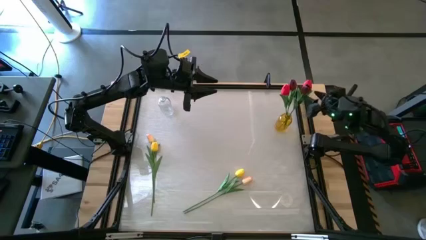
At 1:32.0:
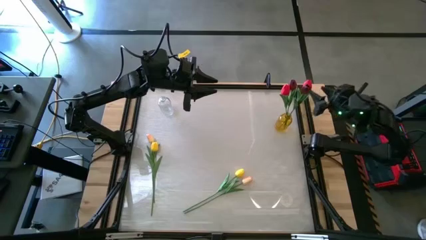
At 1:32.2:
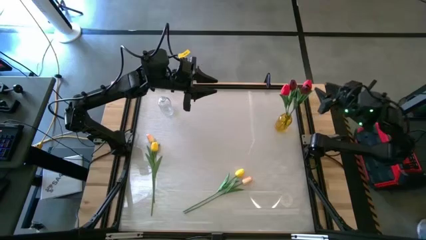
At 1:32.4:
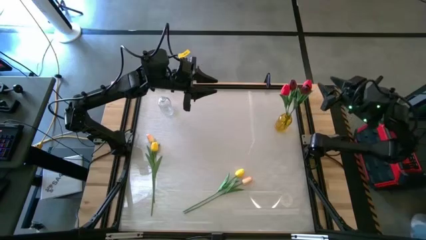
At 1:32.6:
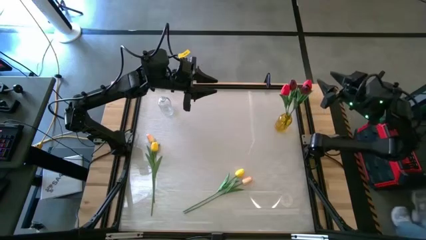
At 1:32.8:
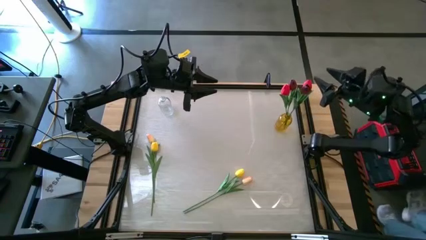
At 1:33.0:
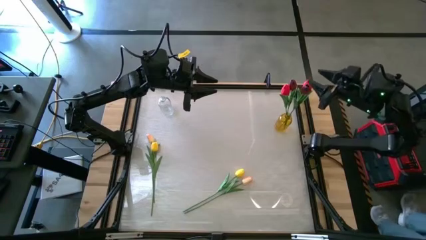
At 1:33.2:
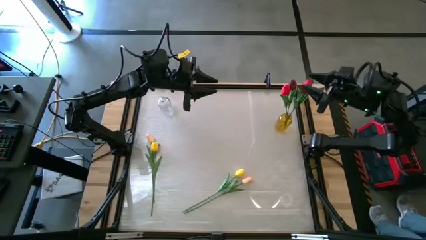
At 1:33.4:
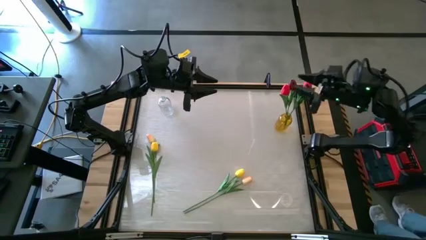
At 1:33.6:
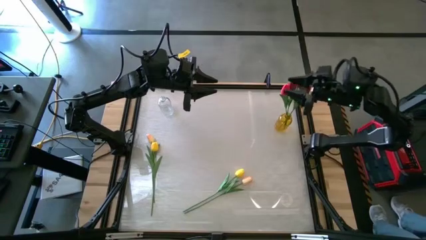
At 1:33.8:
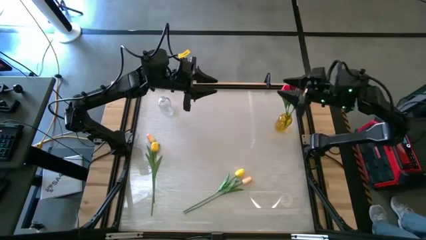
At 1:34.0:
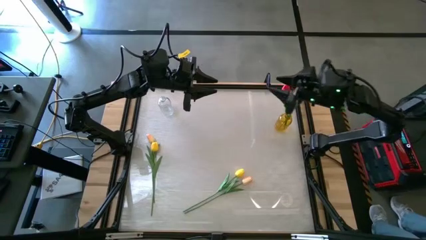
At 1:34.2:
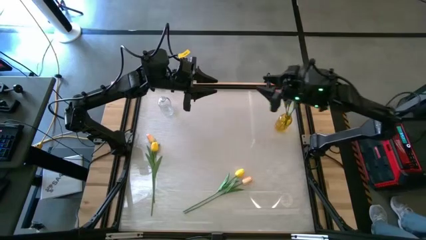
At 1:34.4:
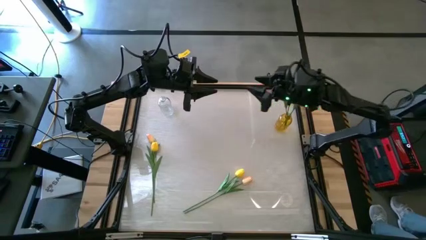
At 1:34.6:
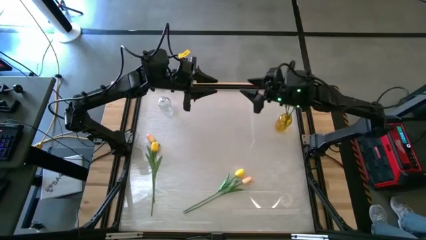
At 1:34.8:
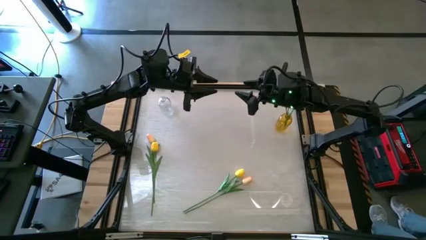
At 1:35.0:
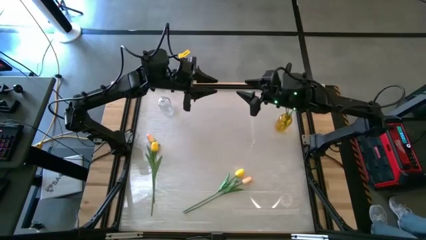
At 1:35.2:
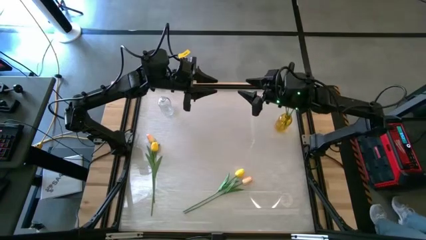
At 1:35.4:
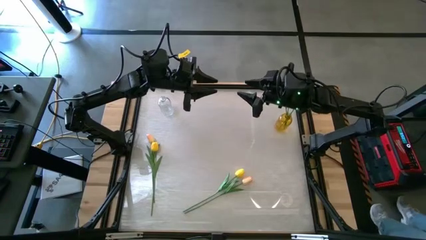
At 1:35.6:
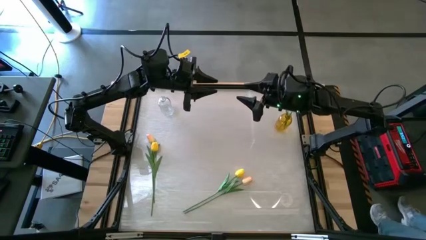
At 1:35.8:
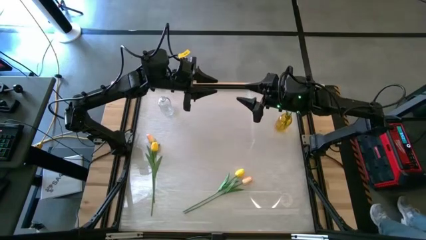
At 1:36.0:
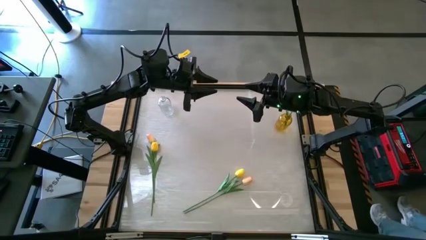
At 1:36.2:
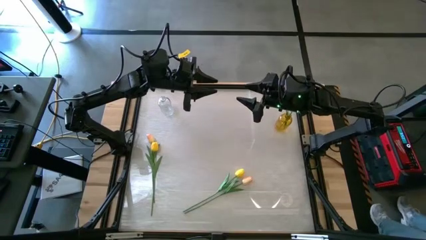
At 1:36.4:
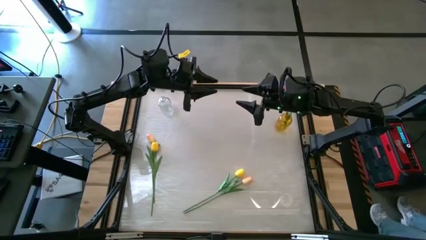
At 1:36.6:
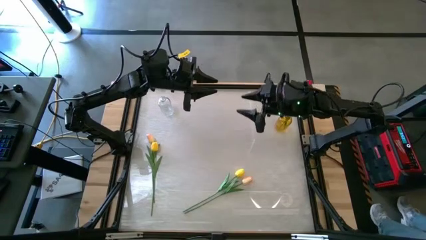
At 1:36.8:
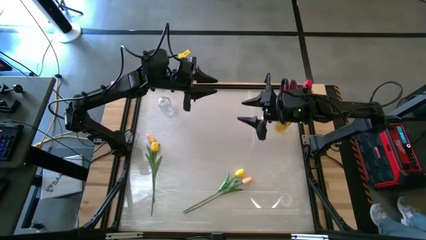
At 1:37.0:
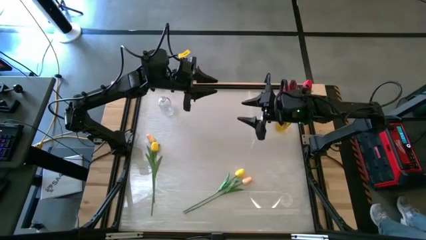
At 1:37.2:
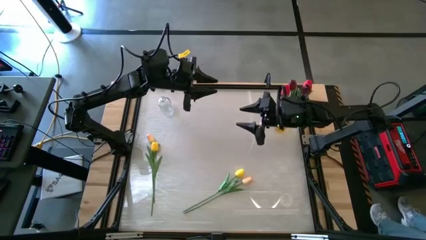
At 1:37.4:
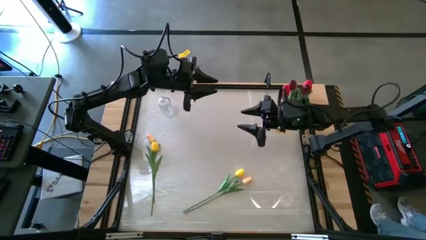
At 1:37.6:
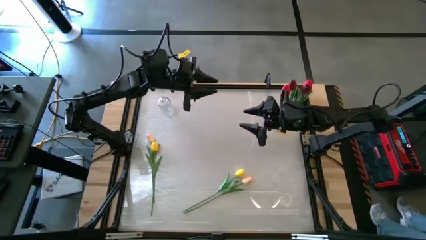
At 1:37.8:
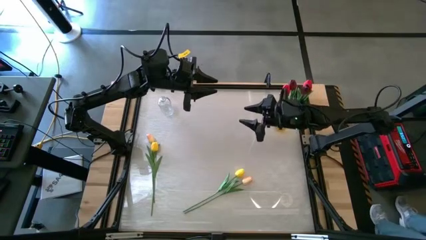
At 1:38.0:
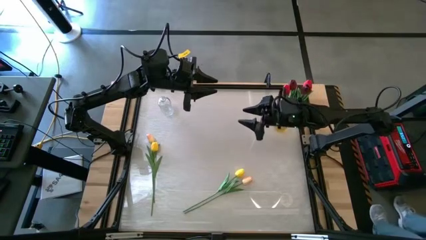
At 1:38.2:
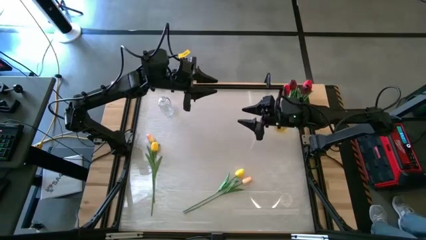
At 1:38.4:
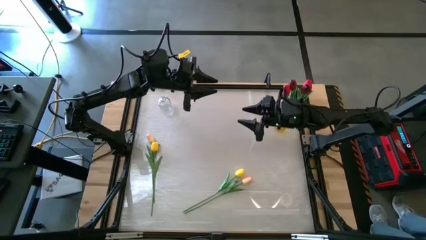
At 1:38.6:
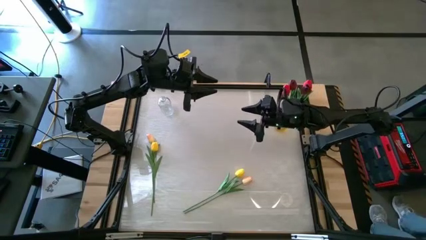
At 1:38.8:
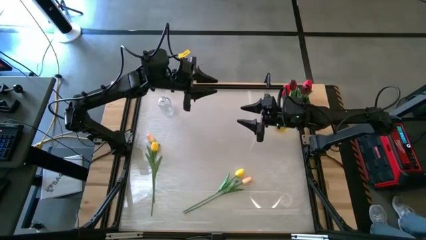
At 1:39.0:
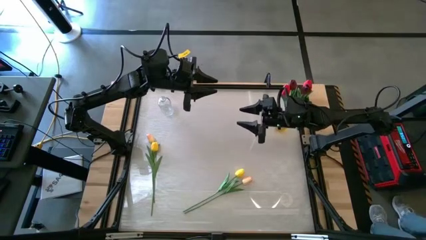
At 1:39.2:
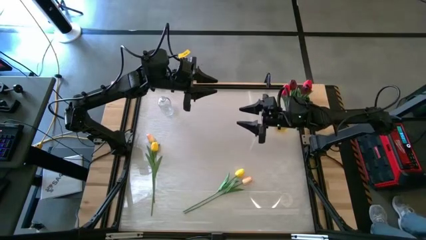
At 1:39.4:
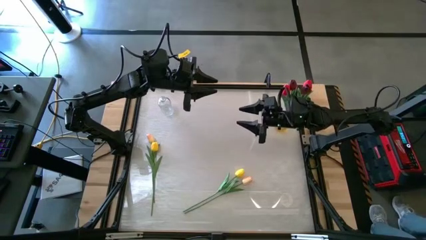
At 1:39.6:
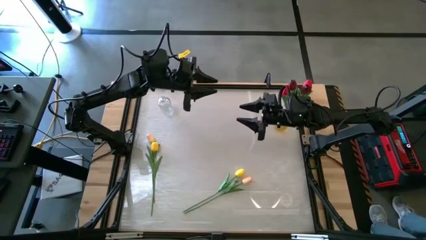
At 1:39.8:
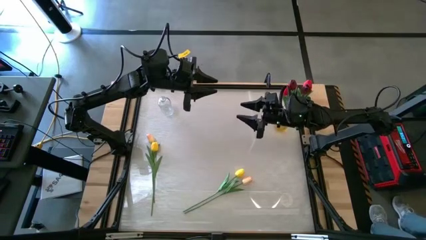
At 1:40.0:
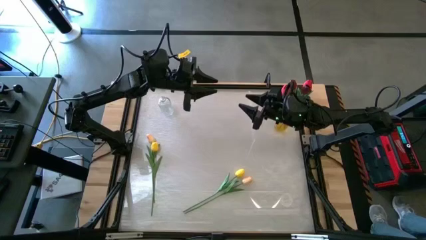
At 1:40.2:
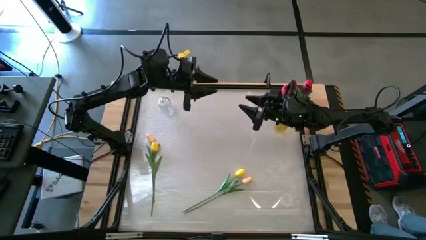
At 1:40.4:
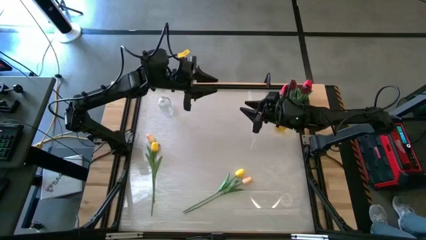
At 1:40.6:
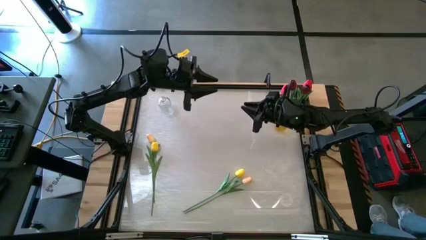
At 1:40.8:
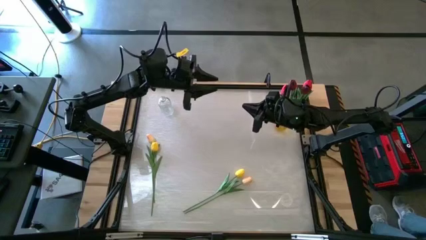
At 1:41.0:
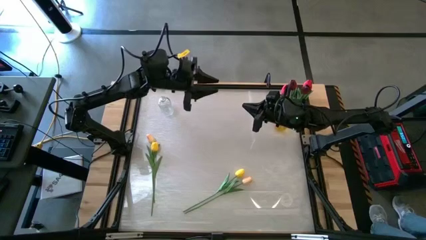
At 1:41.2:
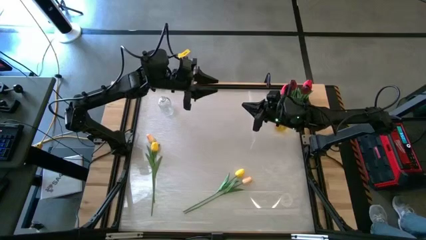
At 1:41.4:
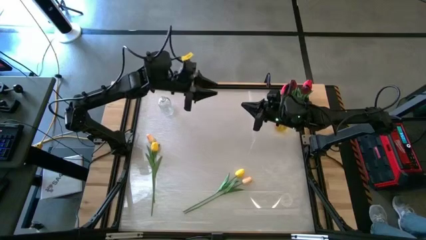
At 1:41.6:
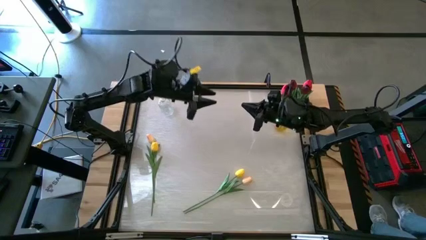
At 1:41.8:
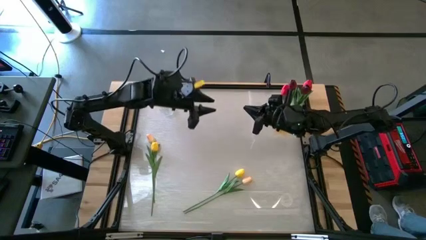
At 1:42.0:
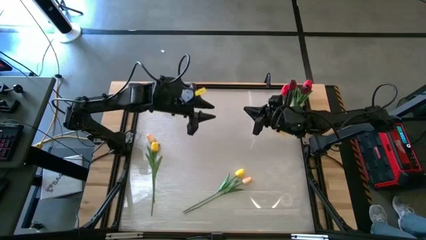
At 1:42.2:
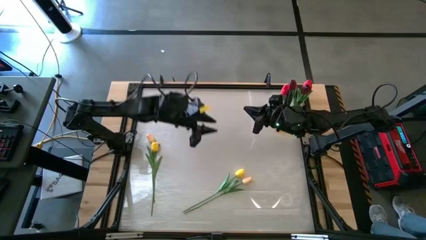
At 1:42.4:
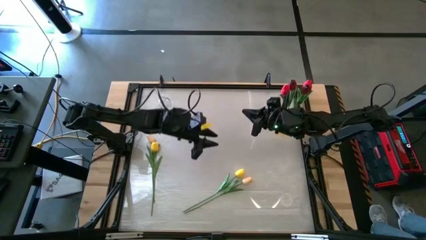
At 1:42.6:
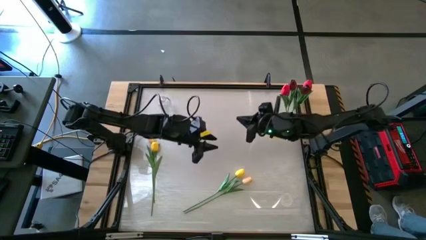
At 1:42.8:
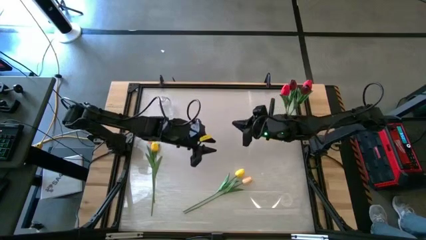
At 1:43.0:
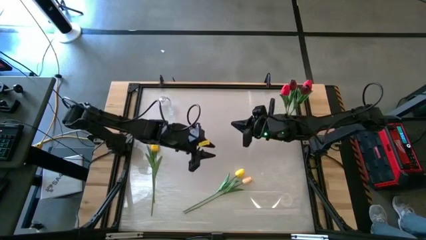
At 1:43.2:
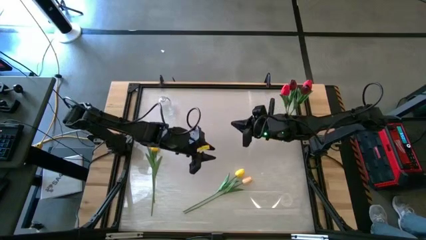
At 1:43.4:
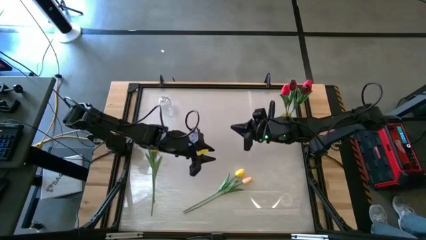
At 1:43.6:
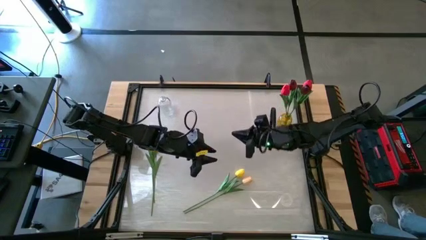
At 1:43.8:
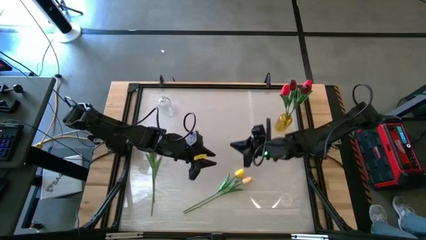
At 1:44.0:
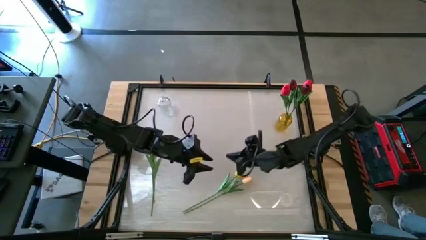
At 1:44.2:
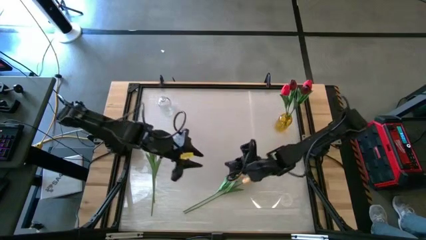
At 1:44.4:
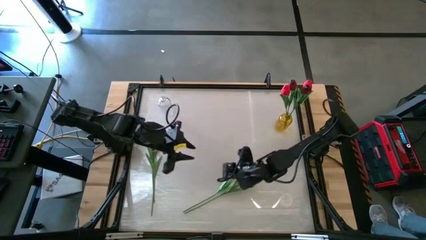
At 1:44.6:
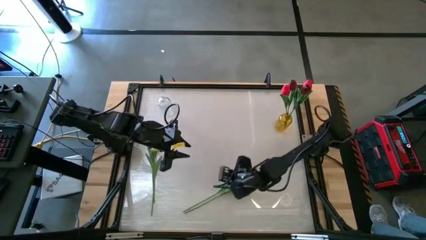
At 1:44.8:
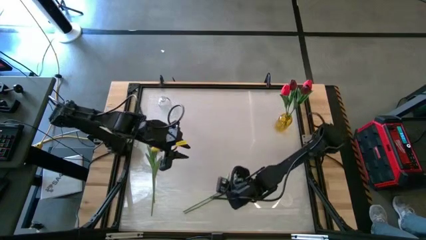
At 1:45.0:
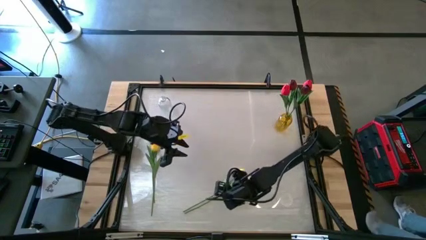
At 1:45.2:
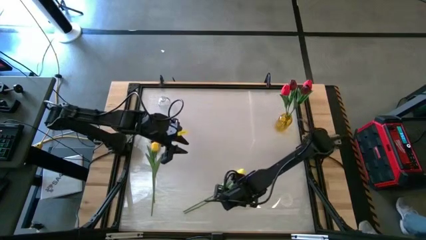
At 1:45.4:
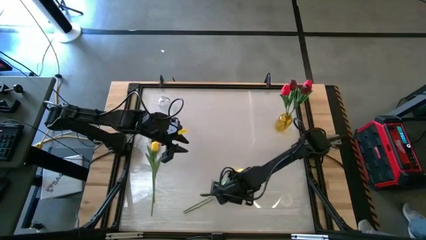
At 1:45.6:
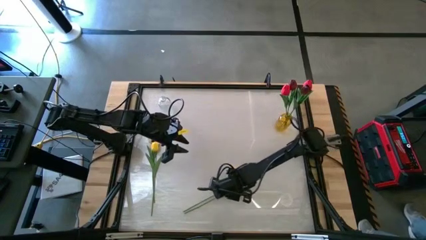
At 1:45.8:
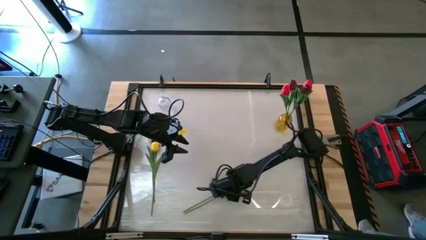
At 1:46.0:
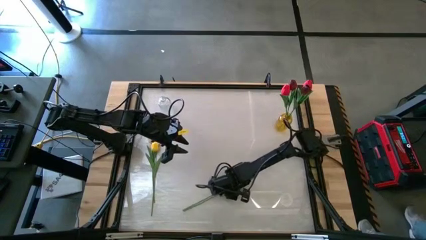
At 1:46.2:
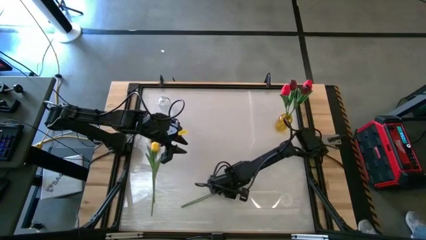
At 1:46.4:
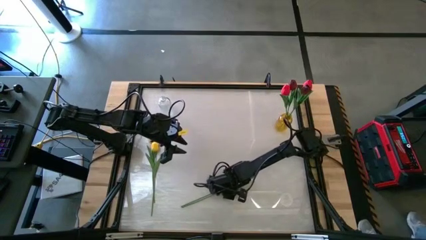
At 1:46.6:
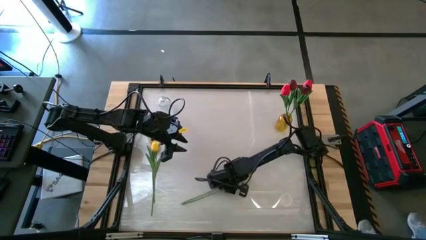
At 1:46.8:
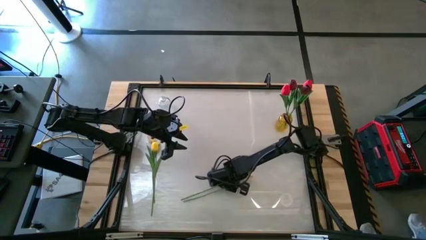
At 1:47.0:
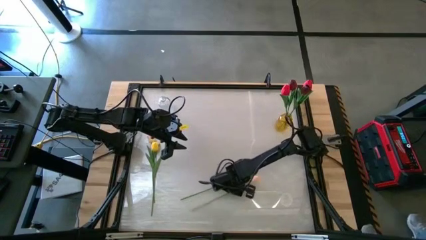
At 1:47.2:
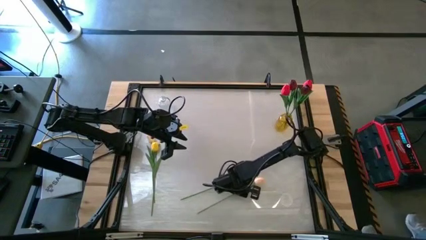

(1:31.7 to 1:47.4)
Task: Sort flowers into vase by color
Put the bottom light pink tulip into the transparent vase

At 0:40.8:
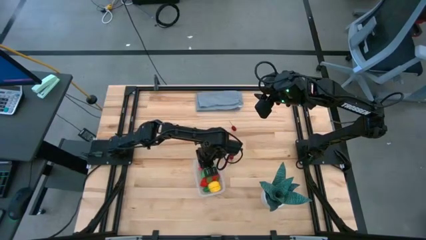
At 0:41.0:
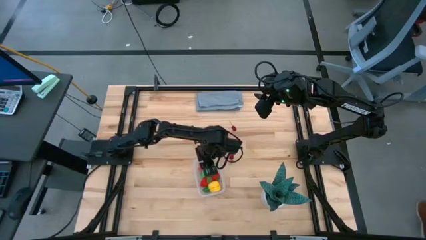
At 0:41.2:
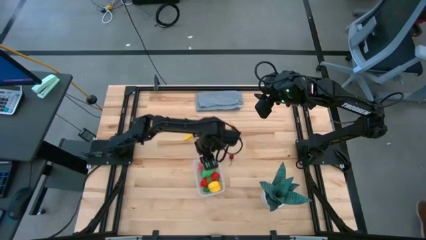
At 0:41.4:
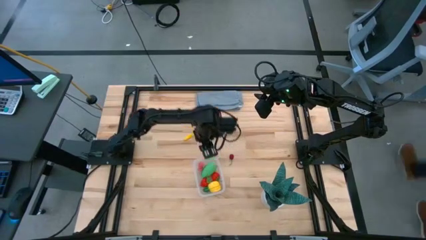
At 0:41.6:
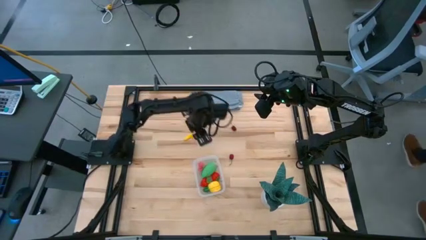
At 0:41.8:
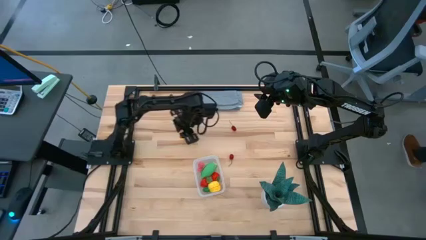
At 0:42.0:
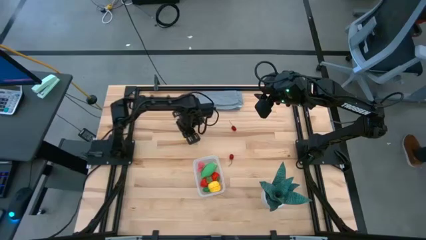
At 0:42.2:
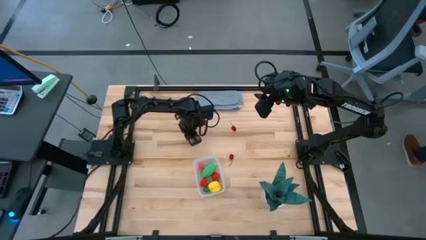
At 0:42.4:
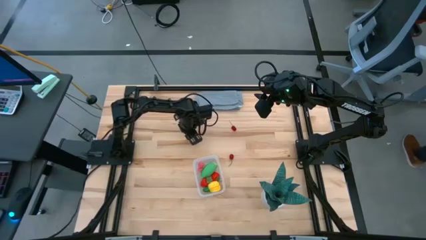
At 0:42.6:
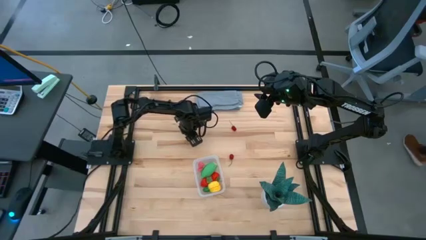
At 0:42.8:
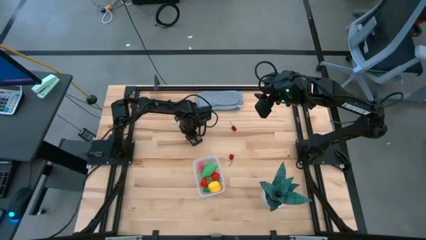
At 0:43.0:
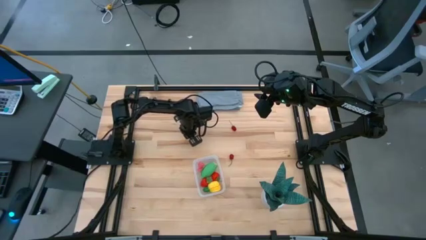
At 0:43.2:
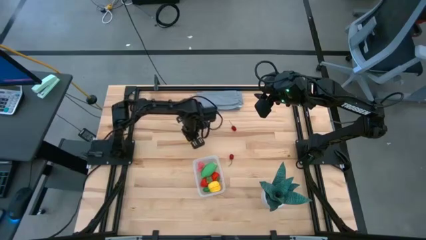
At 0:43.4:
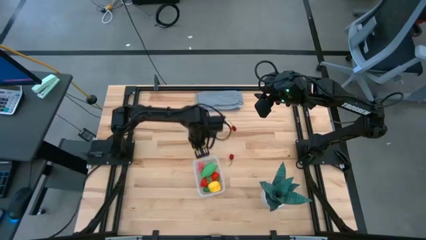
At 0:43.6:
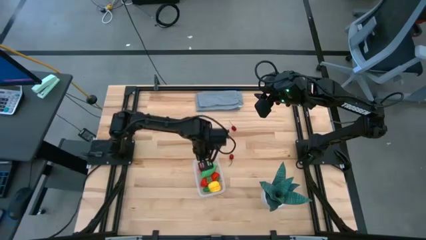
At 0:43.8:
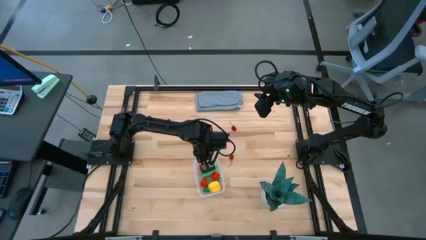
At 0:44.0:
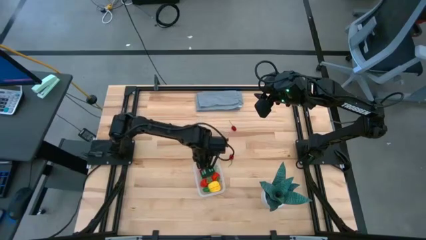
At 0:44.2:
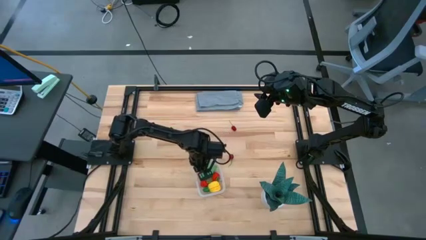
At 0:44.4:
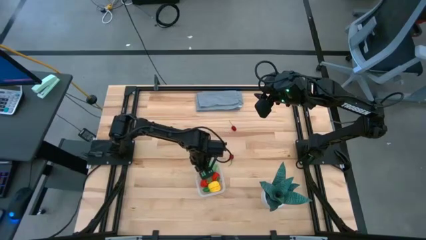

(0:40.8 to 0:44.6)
Task: Pick and placing Produce into tupperware
Put the small corn into the transparent bin
